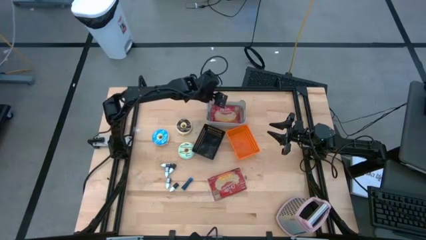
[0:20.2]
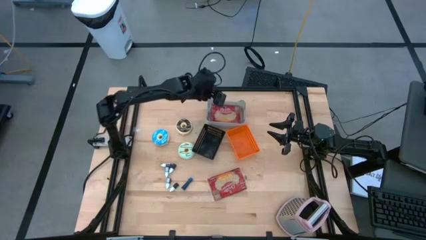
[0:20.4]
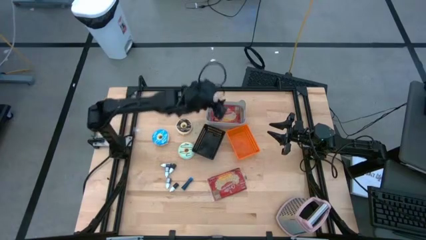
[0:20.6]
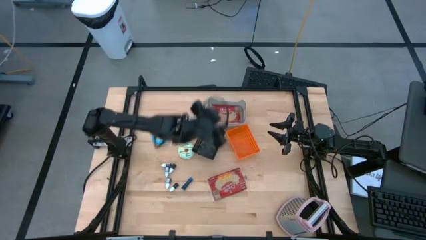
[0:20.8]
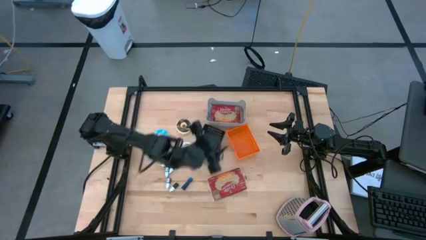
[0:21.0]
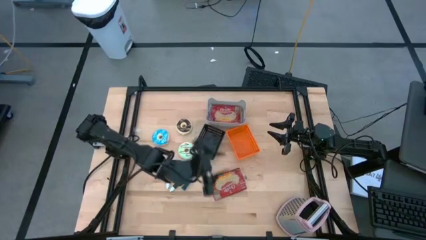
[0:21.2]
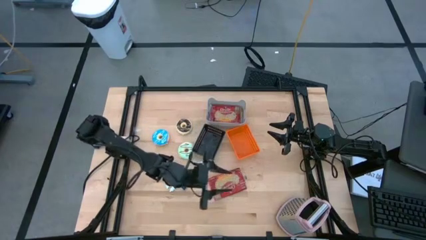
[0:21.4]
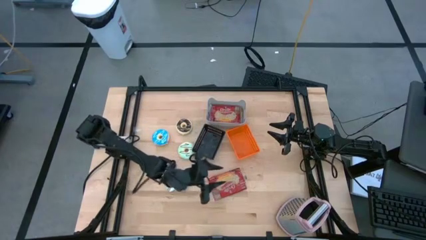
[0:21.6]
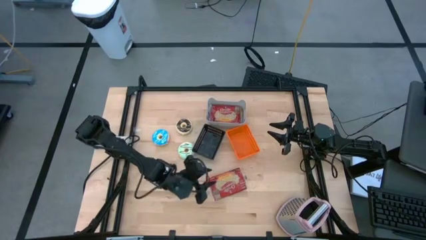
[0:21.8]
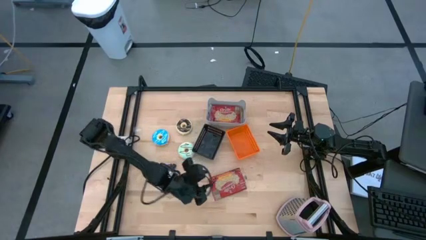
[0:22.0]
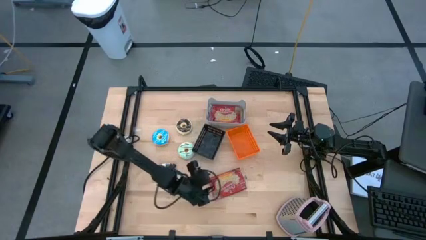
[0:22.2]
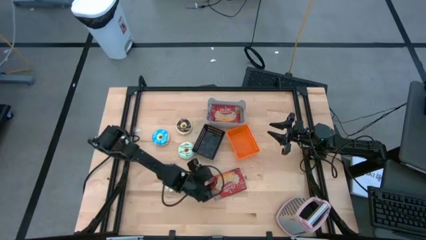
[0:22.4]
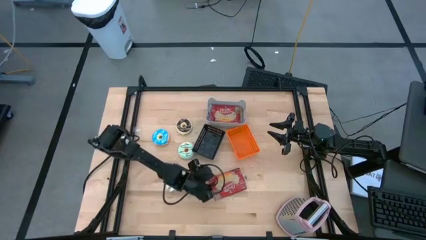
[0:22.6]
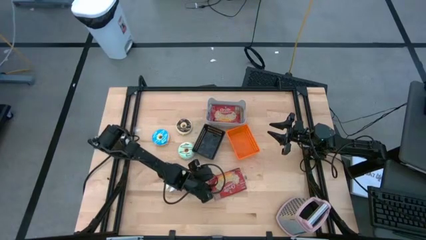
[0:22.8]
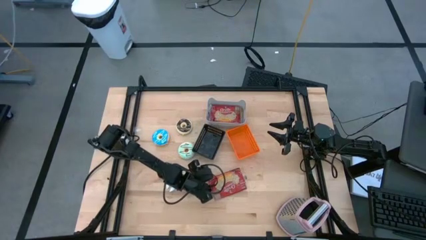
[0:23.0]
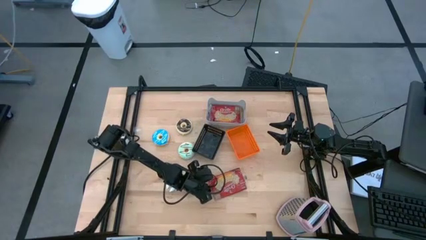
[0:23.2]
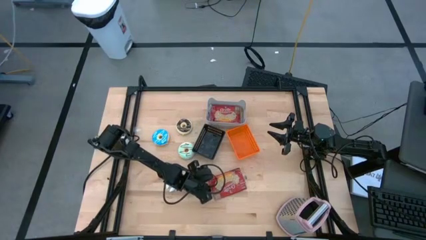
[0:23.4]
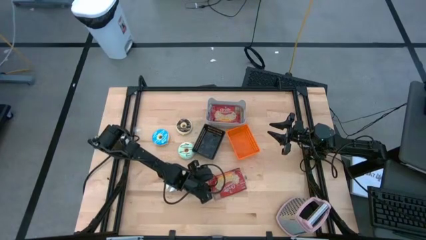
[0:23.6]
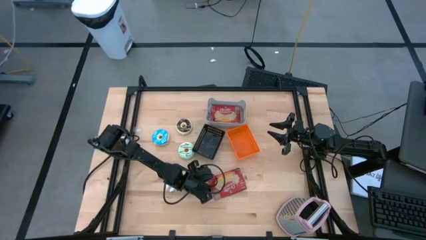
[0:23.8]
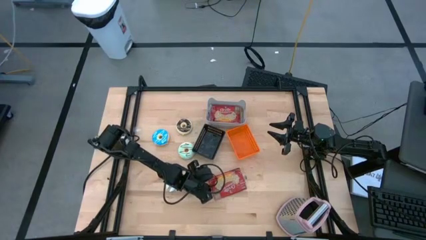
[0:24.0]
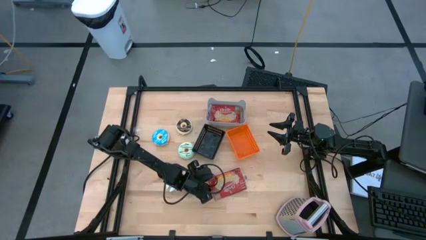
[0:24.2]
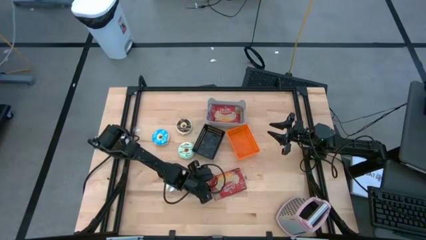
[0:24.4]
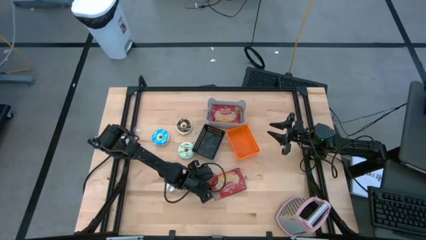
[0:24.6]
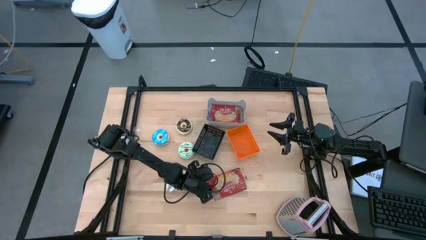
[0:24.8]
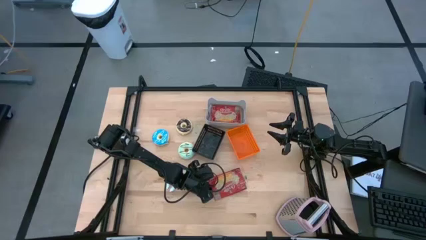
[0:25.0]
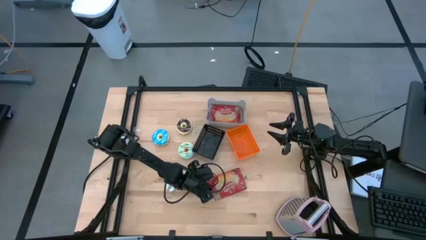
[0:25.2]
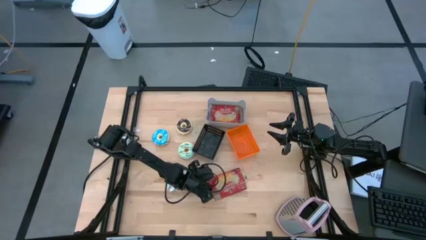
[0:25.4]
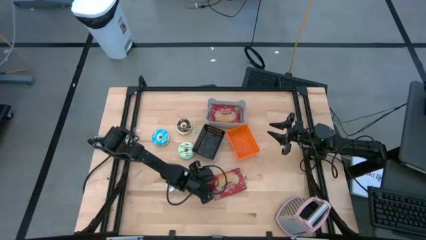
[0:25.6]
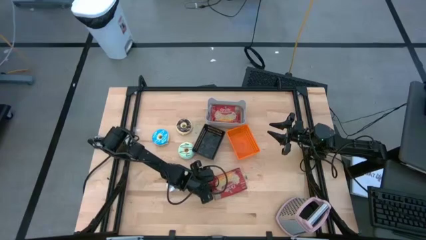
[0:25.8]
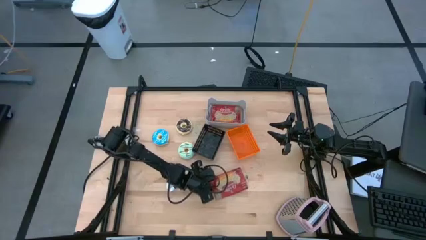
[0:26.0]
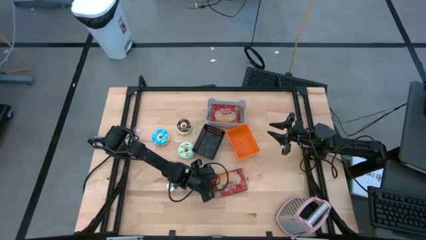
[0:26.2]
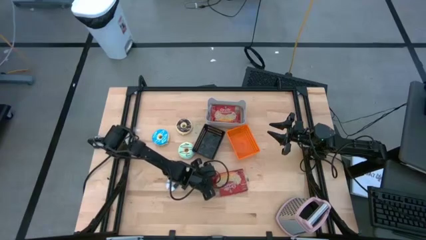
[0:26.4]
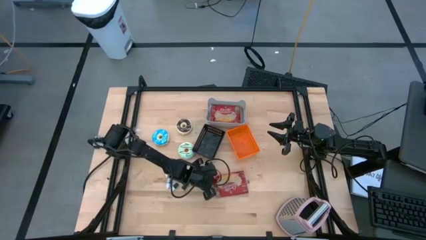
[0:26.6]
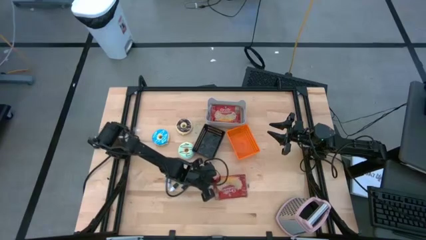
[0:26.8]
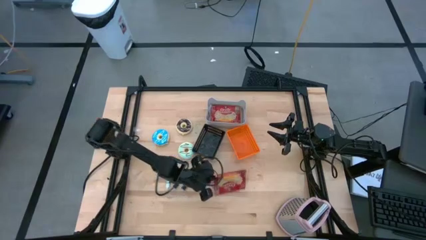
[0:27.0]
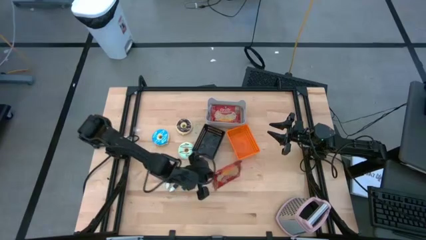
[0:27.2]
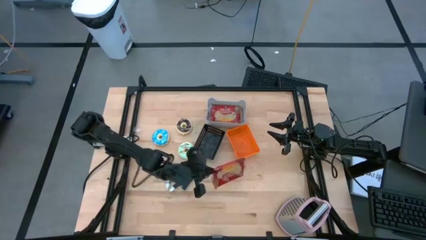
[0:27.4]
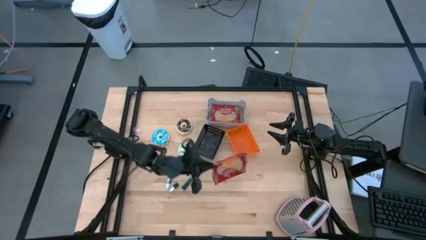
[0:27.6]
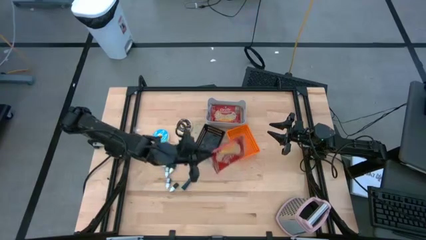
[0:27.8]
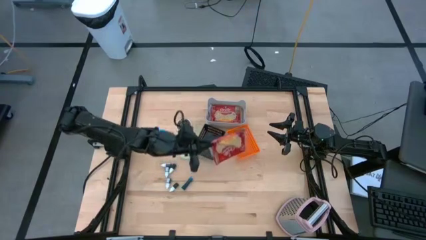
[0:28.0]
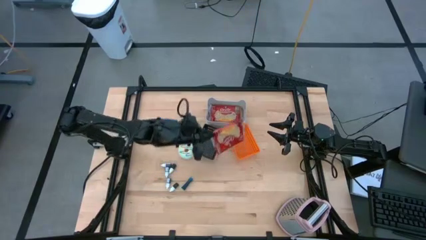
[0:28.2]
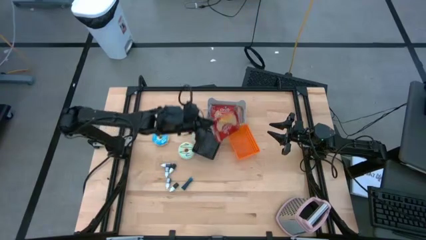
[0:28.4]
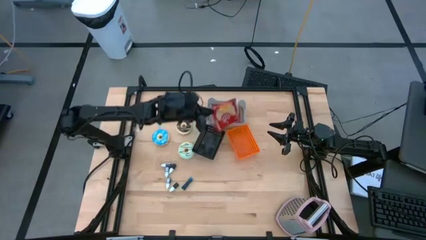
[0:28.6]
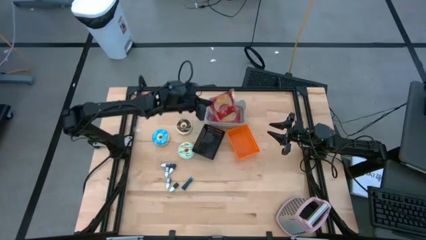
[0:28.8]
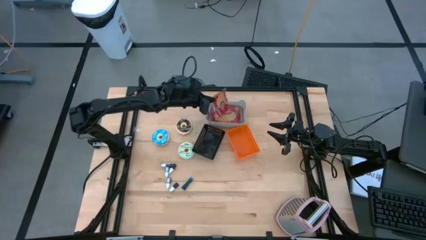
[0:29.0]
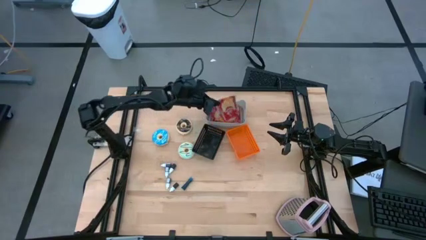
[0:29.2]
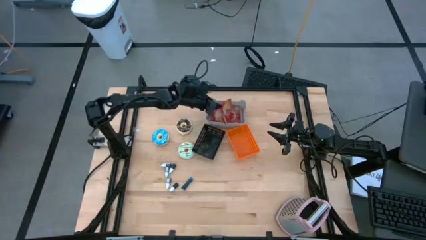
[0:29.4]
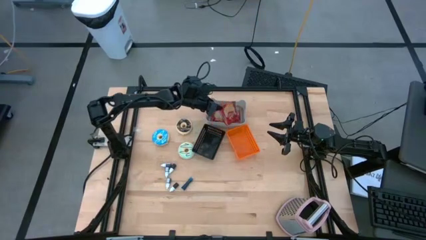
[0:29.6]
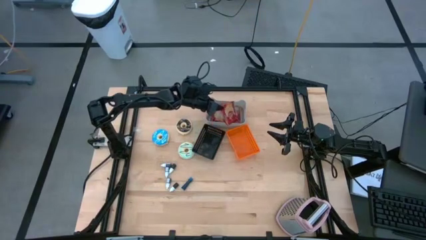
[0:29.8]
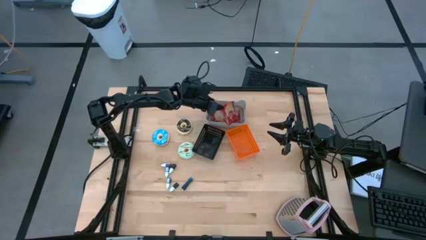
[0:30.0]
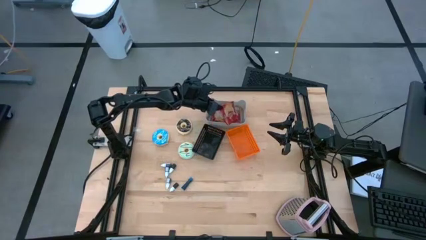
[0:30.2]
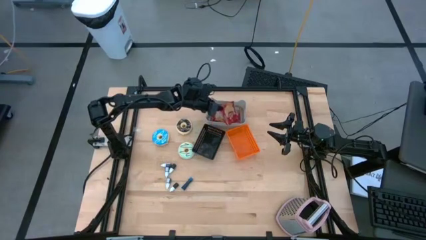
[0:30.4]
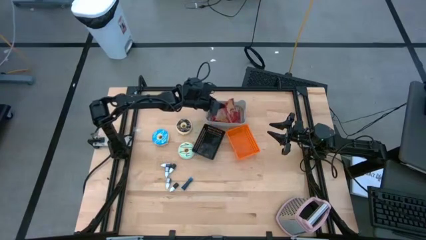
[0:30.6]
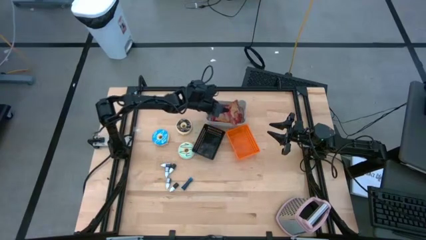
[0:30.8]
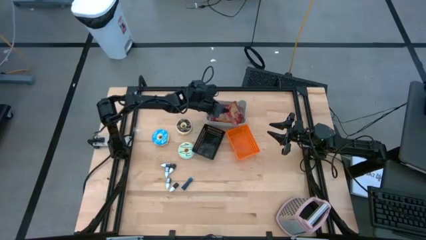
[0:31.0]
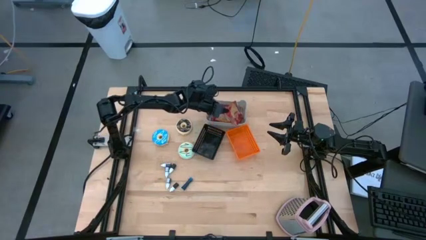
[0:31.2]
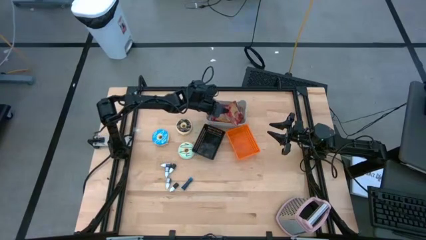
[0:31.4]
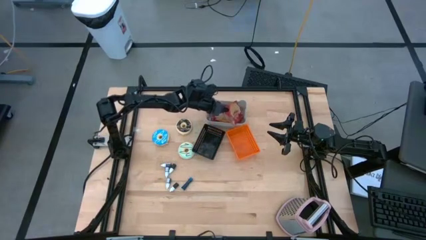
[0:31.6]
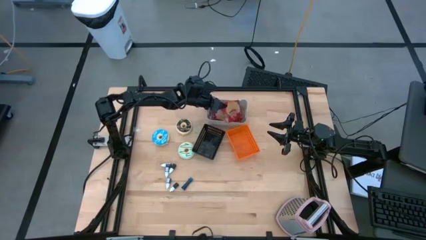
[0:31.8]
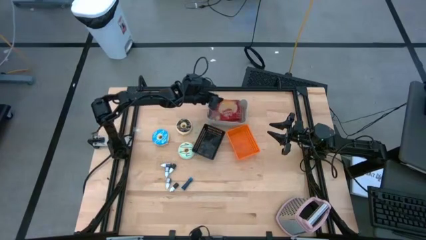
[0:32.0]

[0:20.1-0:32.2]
Put the red popcorn bag into the white bin

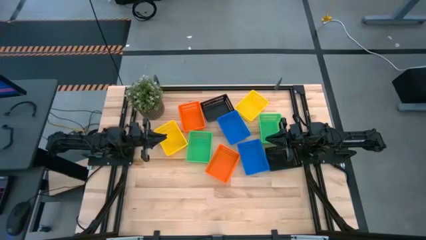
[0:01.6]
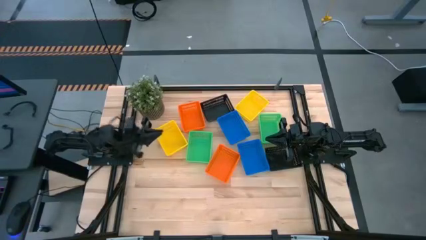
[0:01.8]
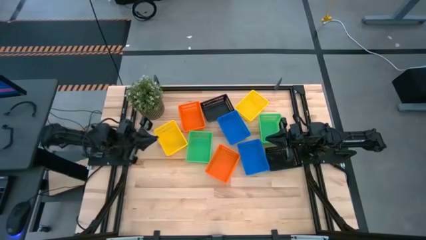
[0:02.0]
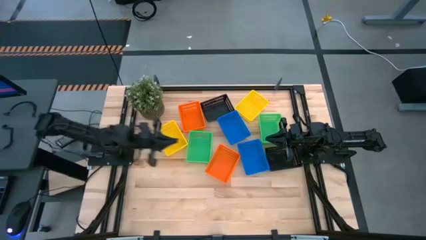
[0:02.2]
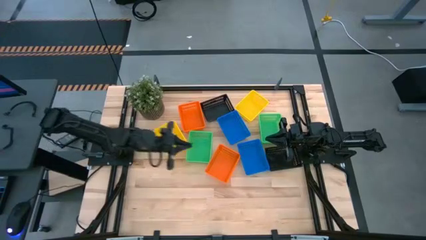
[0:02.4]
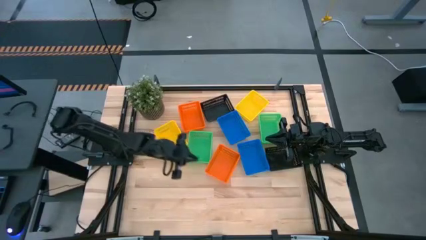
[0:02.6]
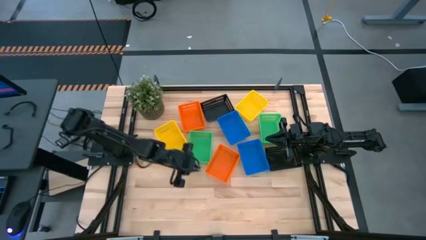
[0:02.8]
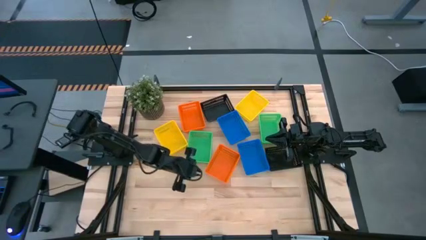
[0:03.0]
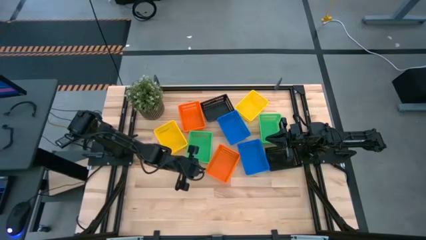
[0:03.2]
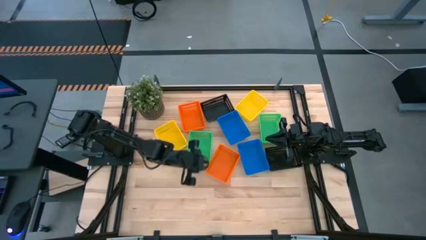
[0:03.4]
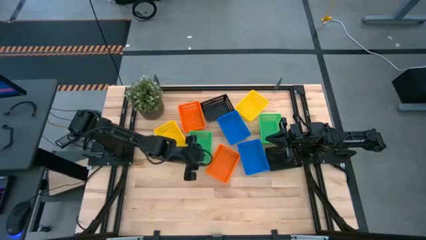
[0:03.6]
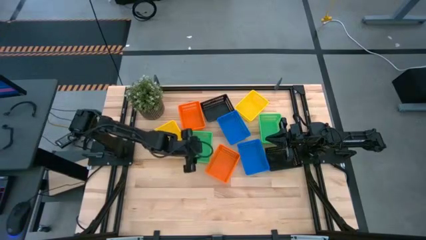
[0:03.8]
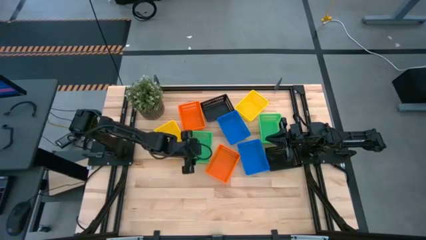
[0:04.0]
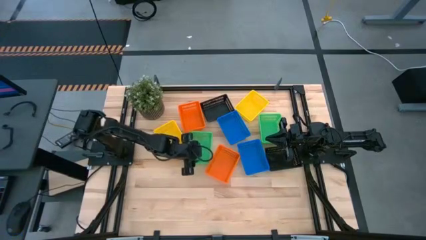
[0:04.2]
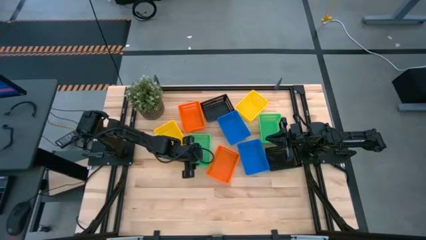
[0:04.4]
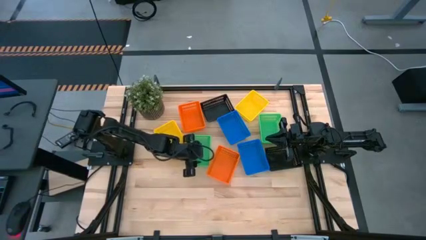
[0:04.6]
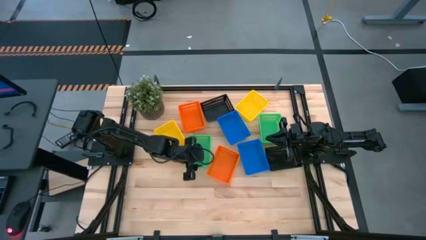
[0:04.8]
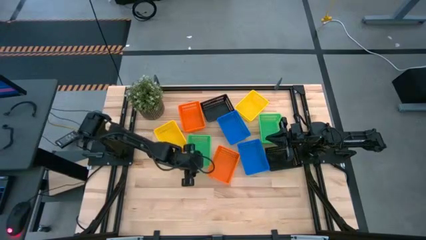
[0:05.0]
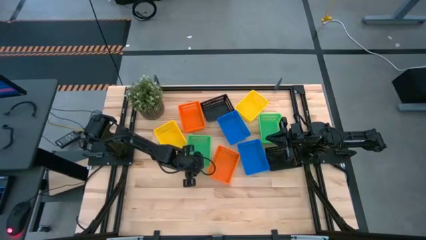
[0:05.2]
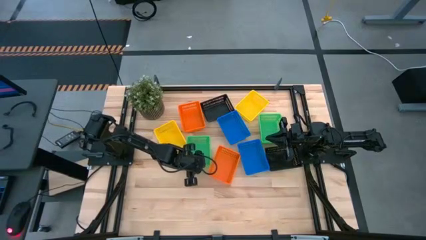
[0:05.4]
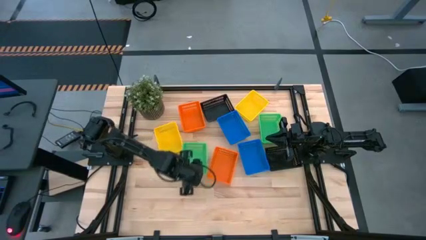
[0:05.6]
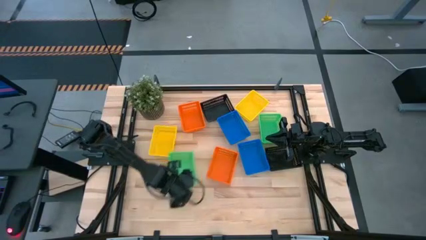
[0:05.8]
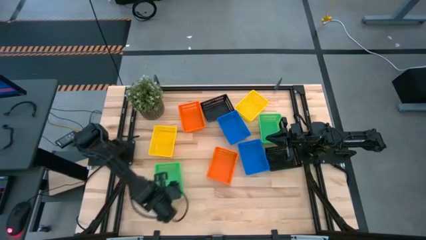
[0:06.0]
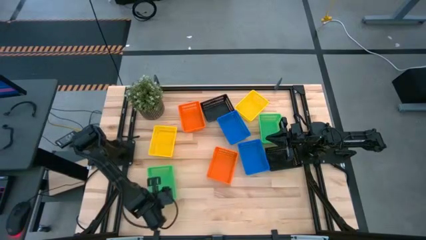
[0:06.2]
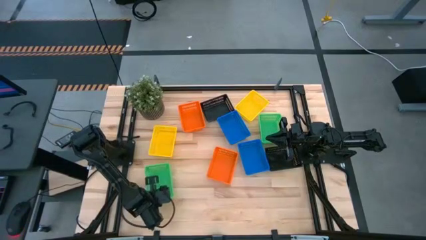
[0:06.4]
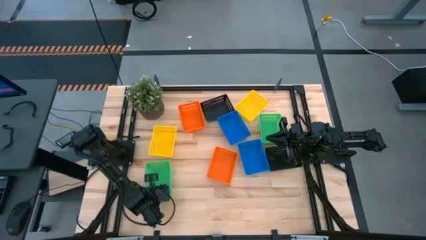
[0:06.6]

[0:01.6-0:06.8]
Move the left green bin to the bottom left of the table
